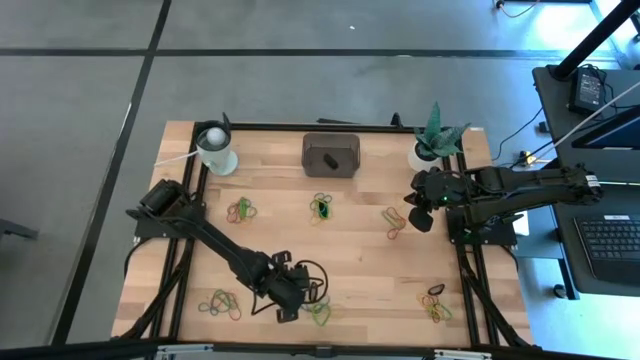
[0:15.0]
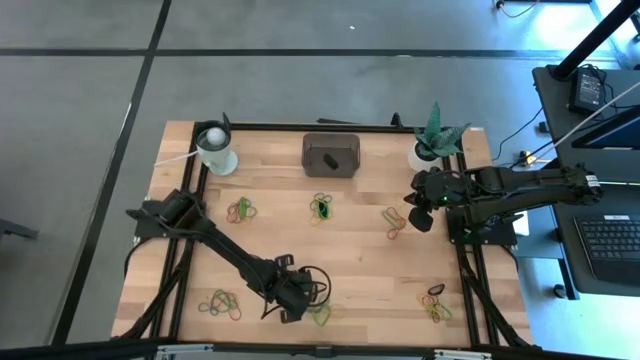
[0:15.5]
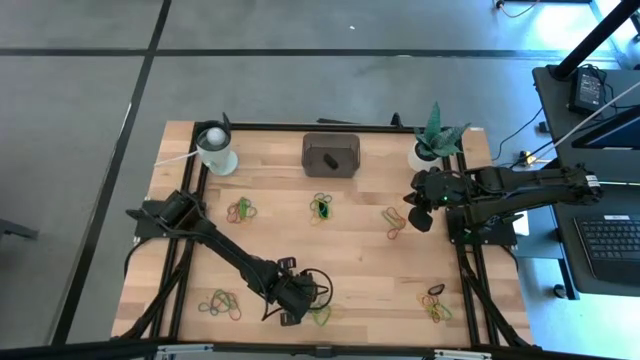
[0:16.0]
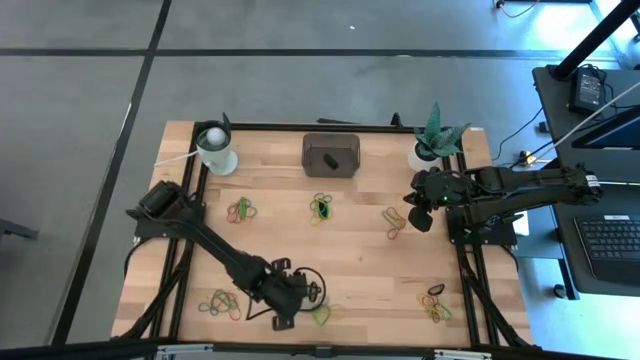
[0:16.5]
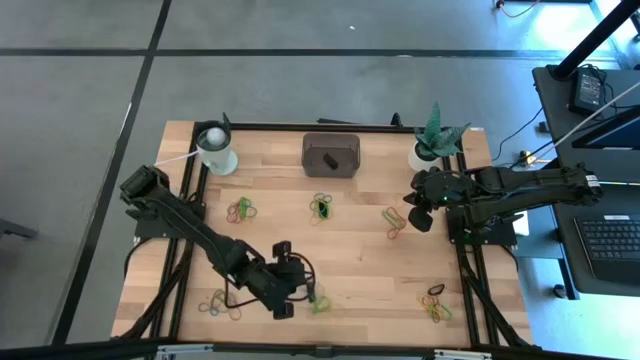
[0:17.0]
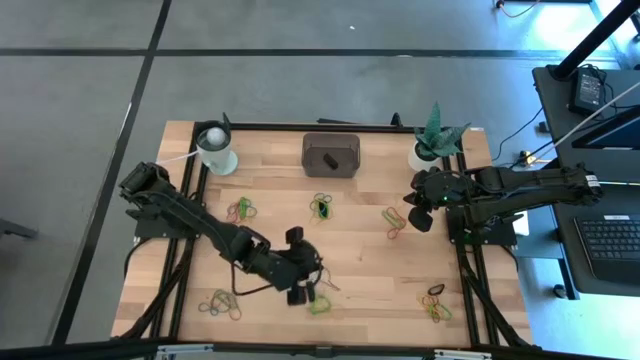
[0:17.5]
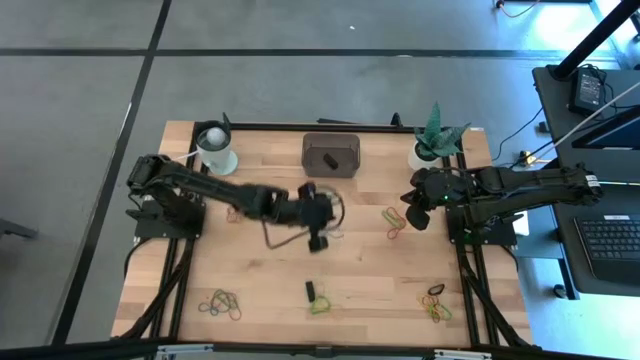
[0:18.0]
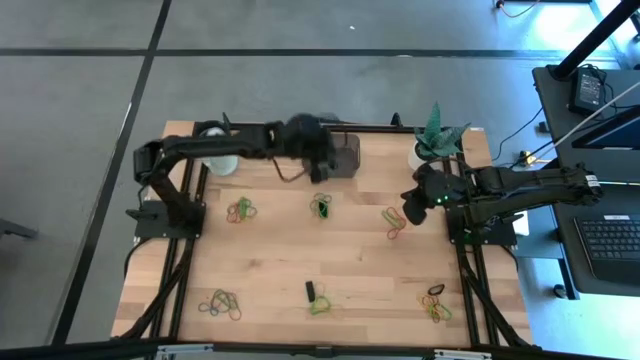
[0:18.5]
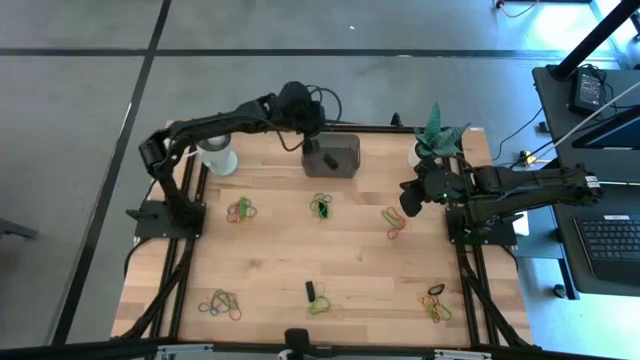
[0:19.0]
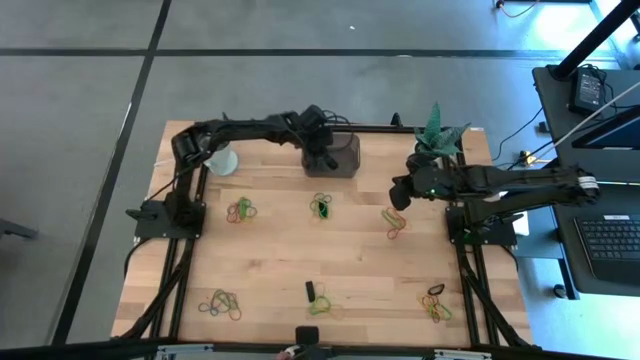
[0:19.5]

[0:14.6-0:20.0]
Task: Pick and place rubber bands into bin
Put the blue rubber band into the bin

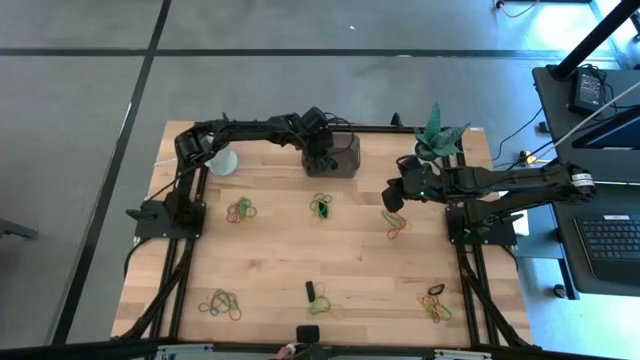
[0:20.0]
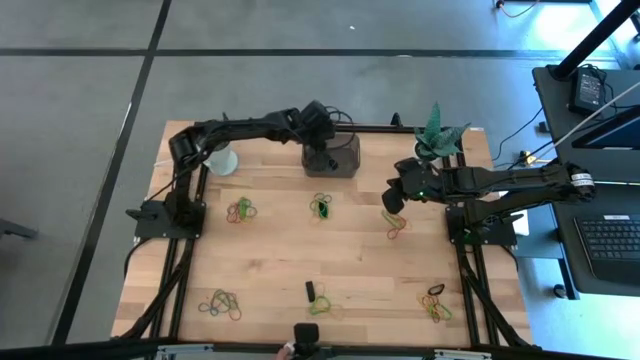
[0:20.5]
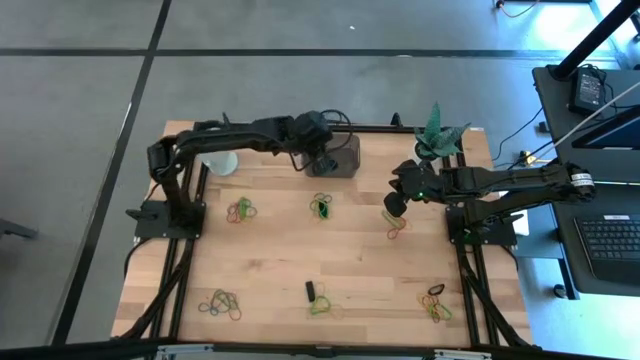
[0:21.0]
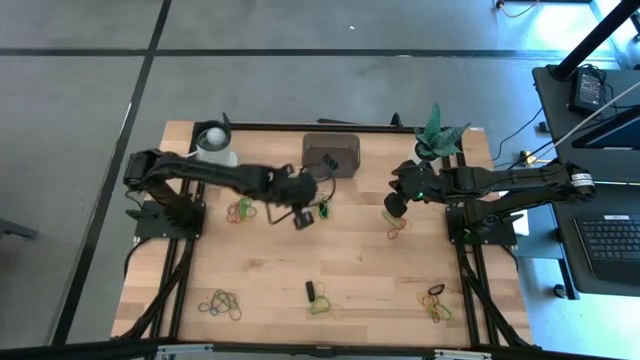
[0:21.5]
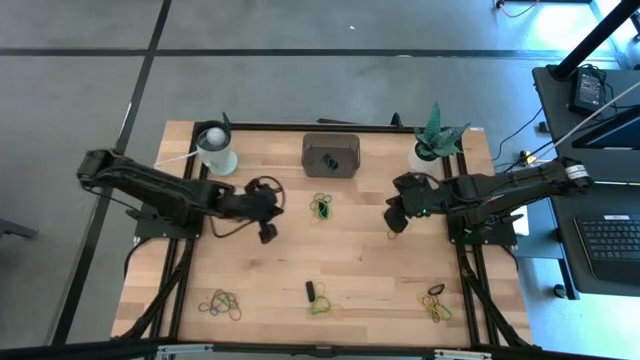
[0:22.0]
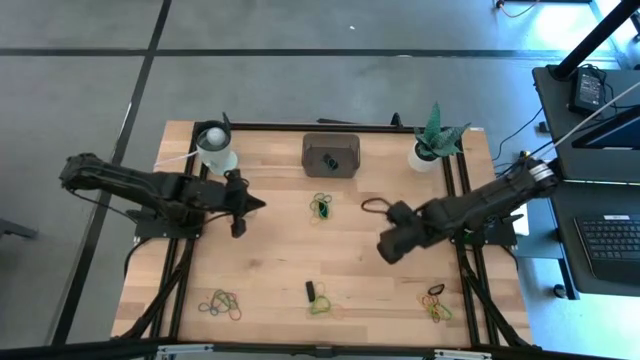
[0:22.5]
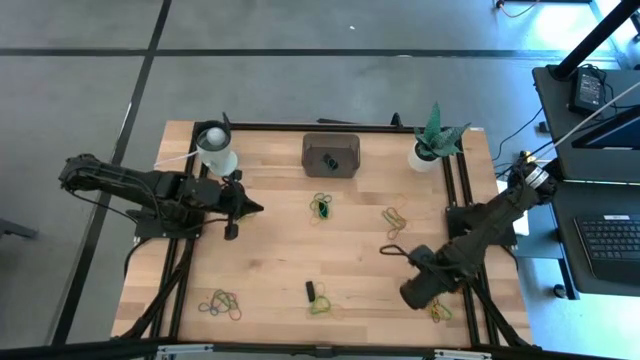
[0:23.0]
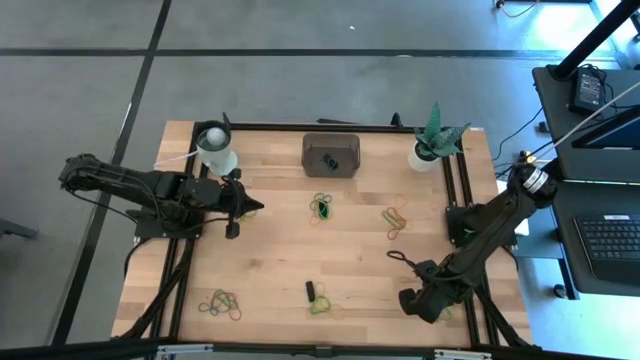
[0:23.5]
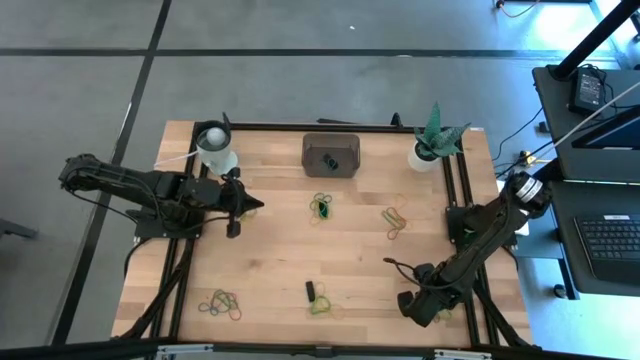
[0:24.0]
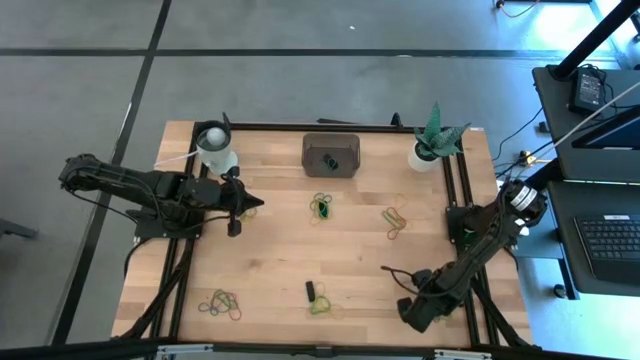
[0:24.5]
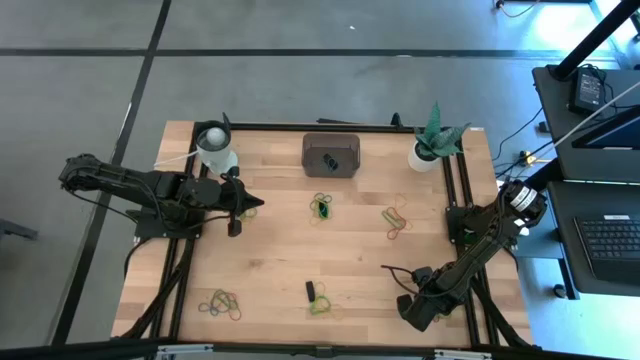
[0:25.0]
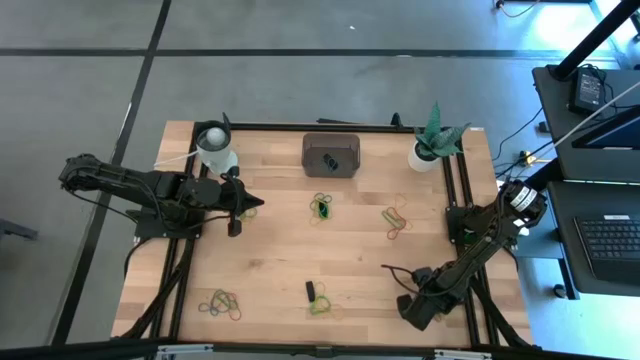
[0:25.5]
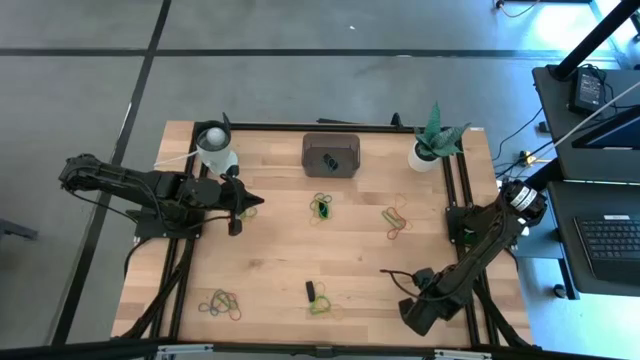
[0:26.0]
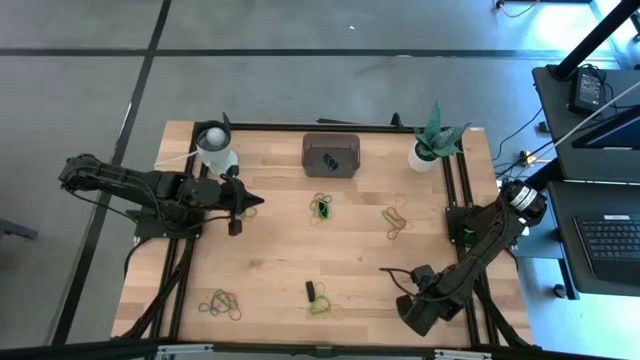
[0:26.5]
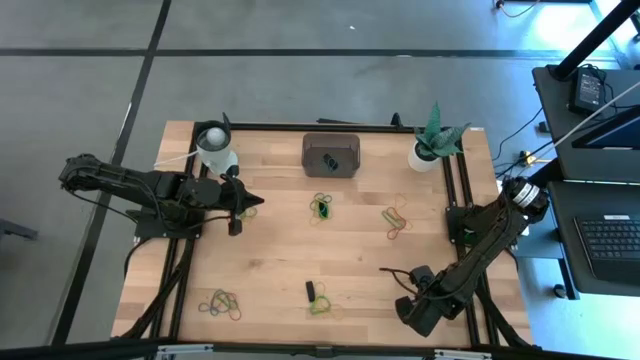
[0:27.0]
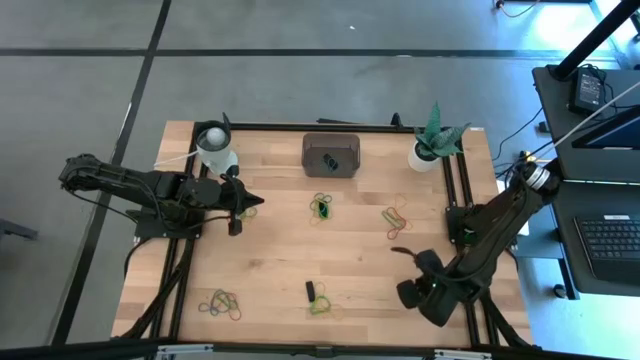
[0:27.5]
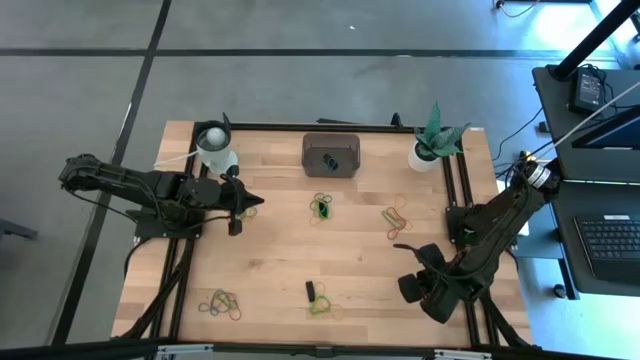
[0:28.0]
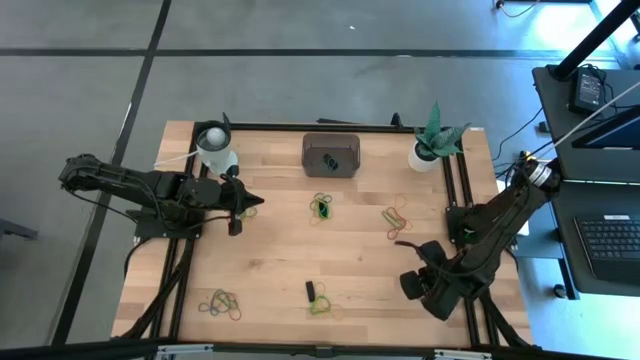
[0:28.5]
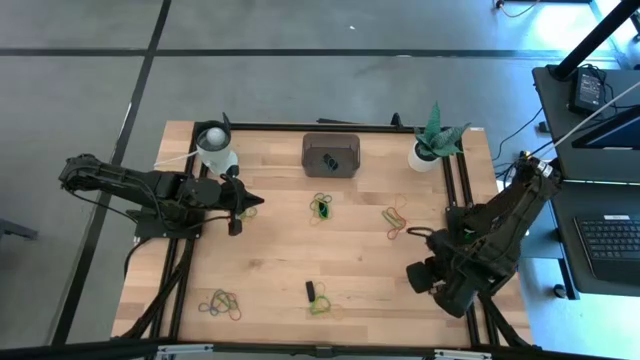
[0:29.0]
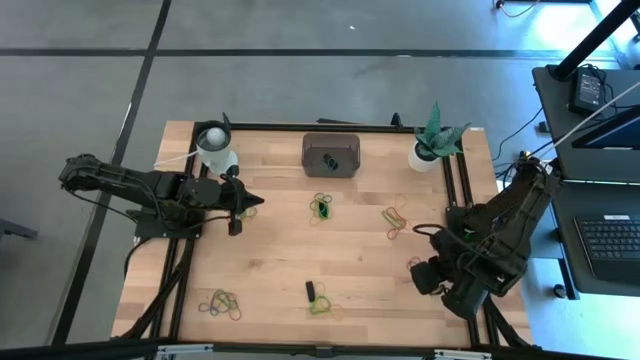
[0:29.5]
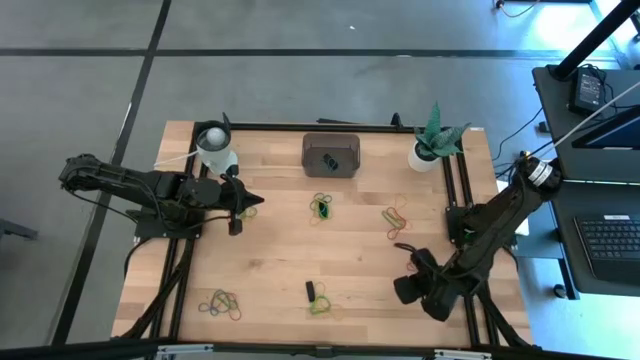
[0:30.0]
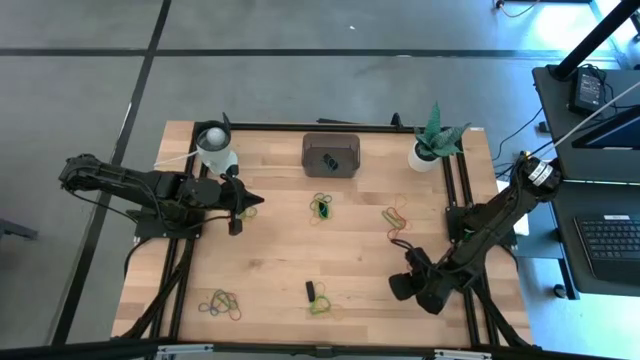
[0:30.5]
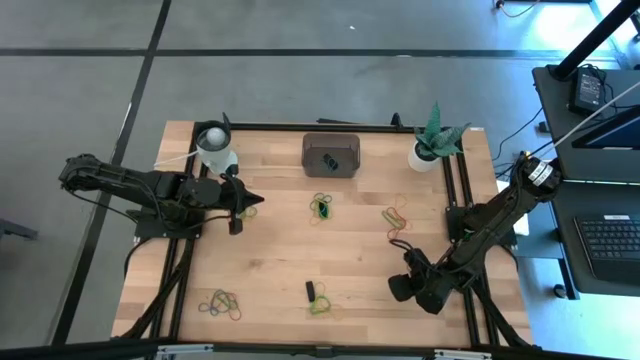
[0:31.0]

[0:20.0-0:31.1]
Put the green rubber band into the bin

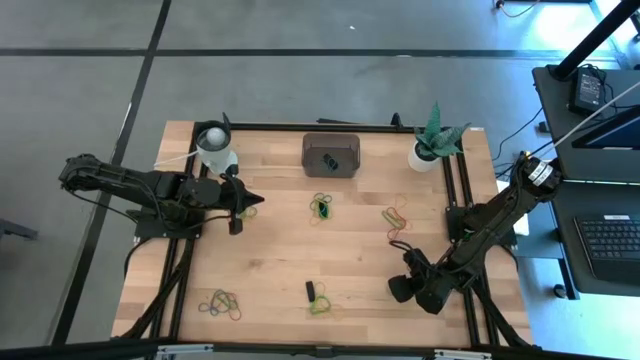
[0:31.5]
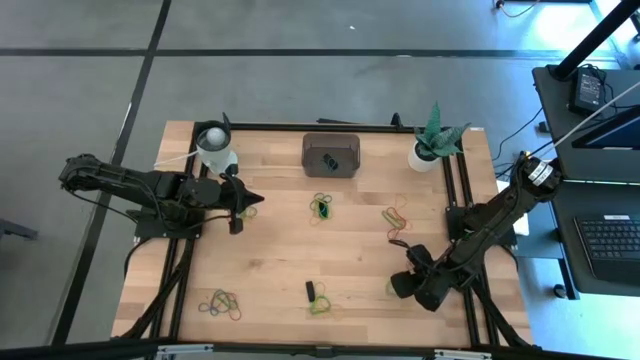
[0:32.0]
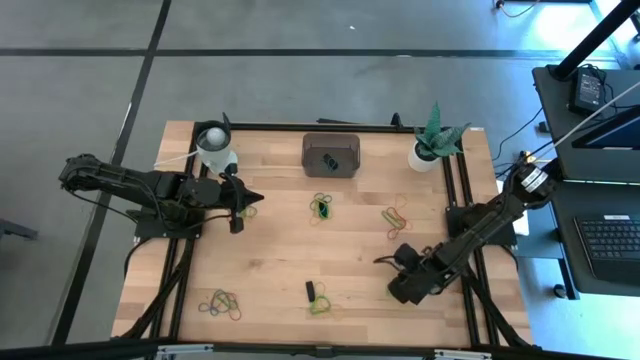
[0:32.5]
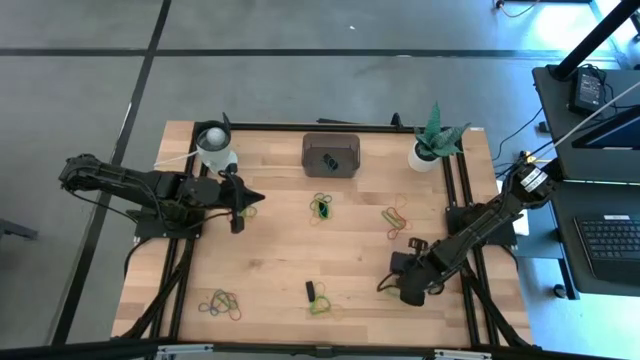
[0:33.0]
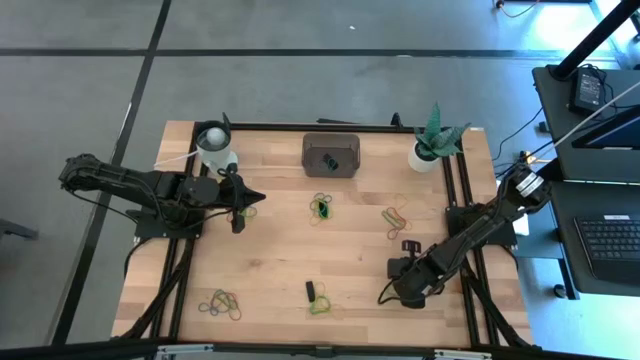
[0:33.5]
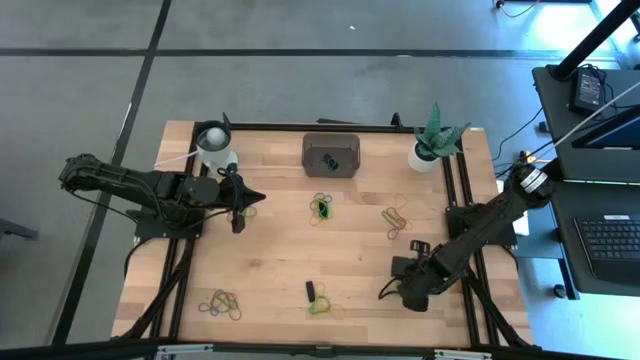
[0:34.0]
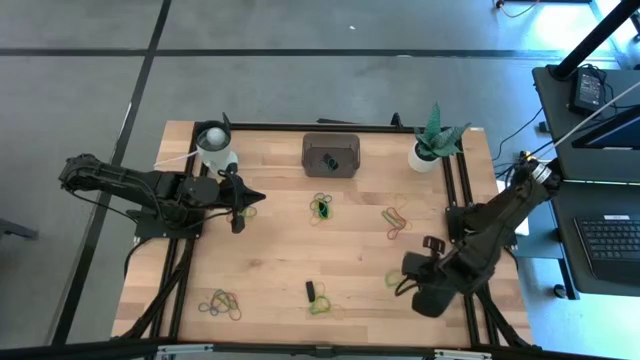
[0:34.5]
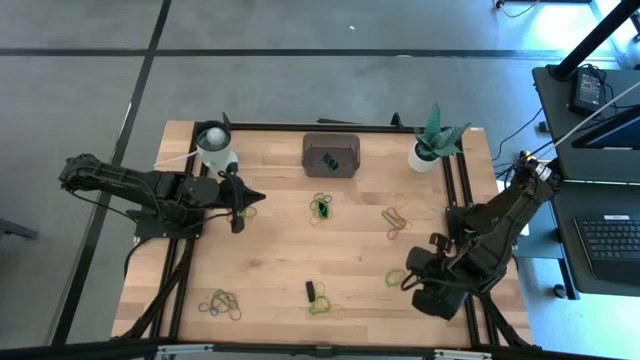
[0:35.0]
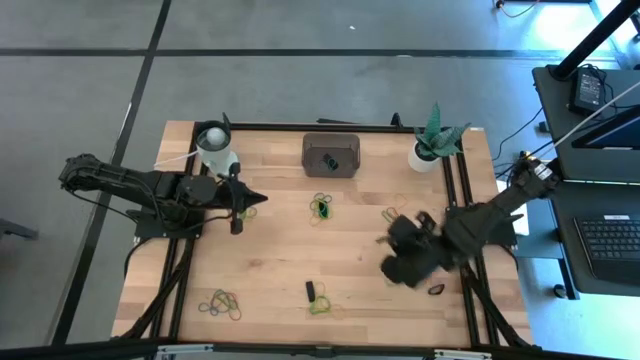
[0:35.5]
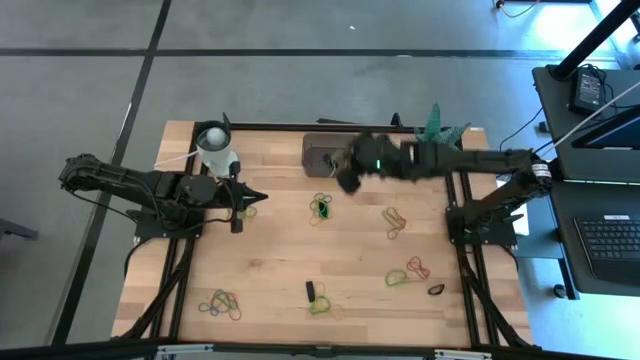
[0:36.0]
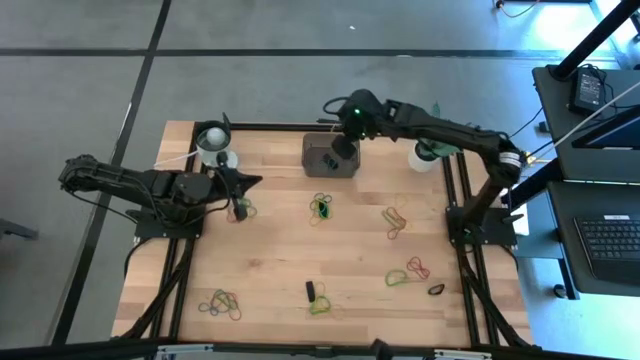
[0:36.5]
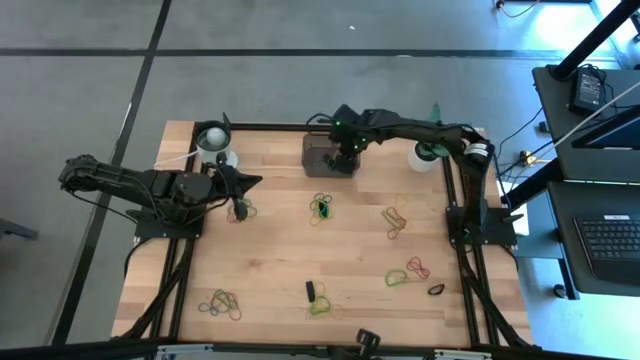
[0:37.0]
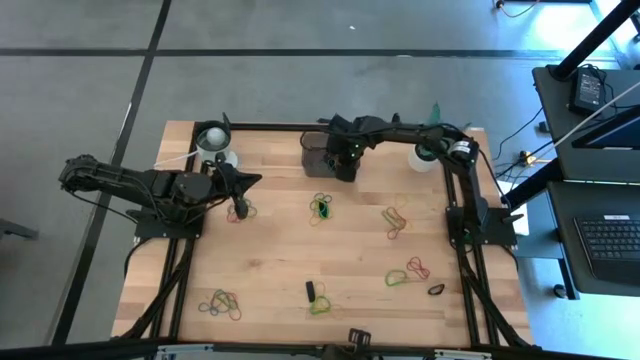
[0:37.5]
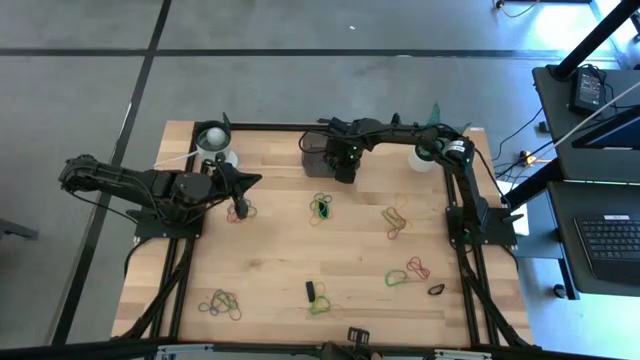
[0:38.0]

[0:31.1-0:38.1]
Put the yellow rubber band into the bin
